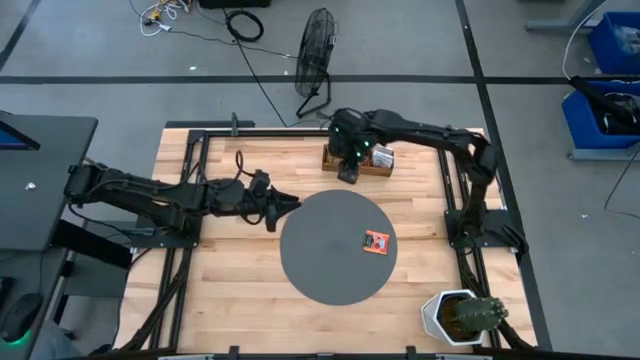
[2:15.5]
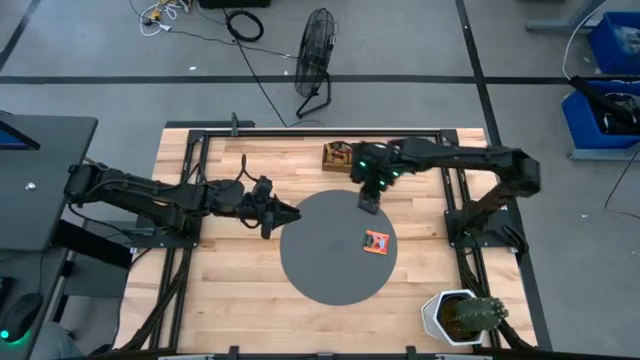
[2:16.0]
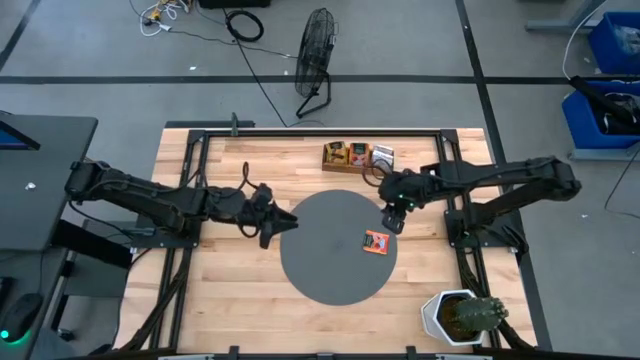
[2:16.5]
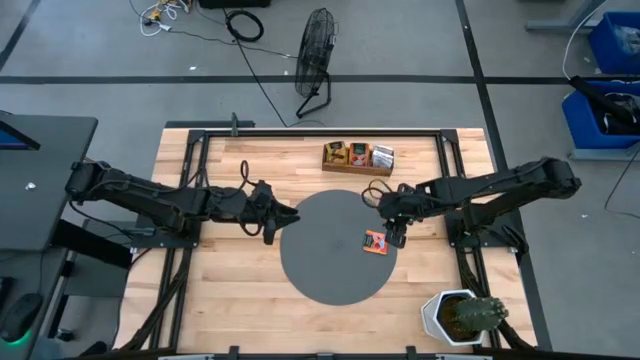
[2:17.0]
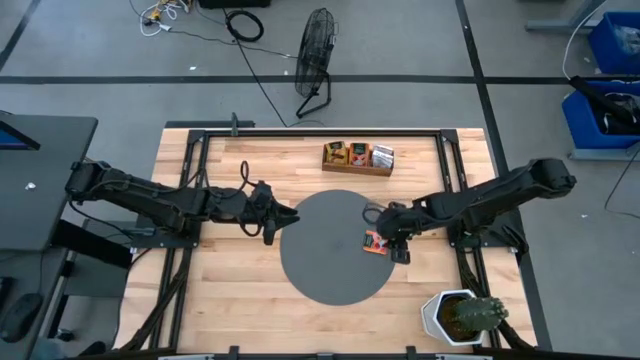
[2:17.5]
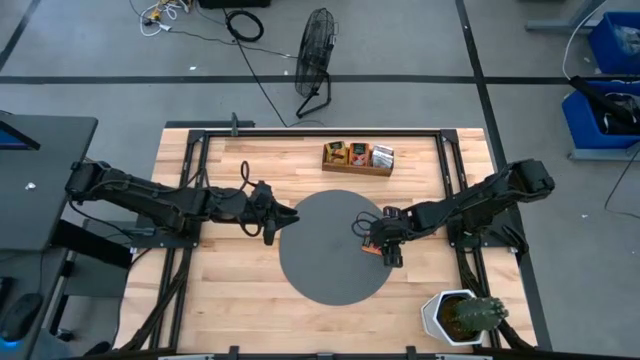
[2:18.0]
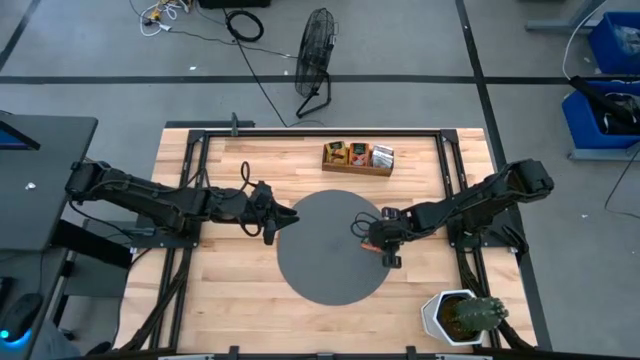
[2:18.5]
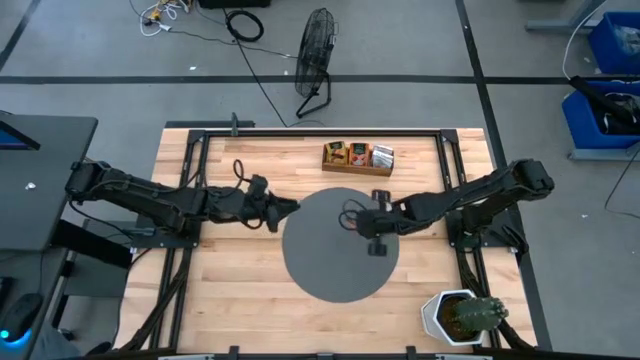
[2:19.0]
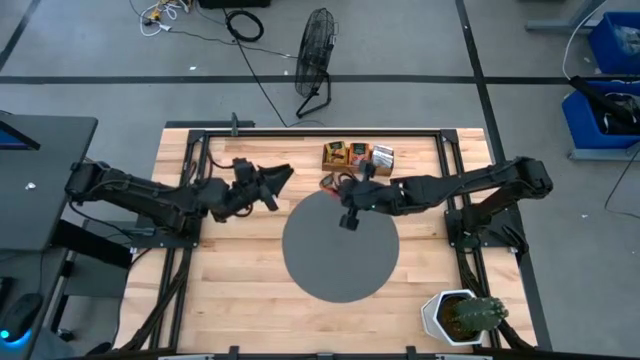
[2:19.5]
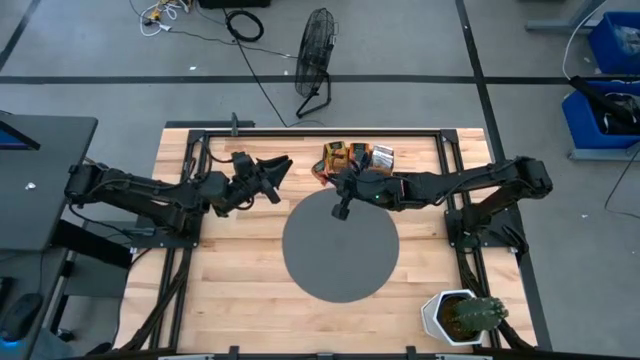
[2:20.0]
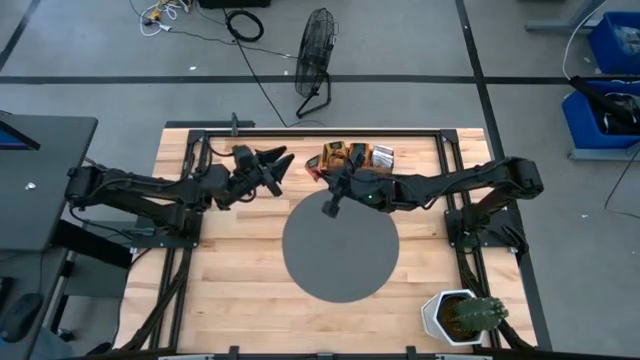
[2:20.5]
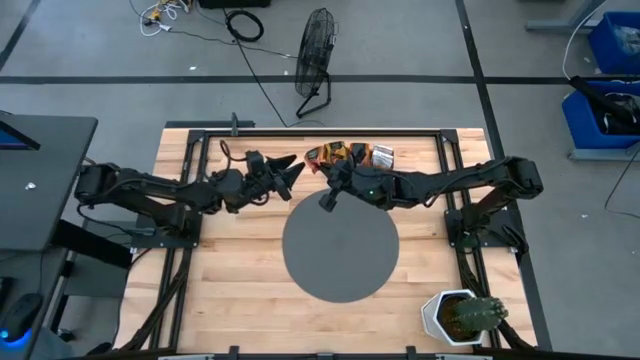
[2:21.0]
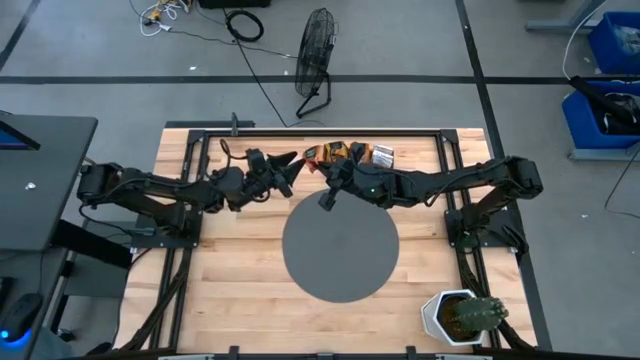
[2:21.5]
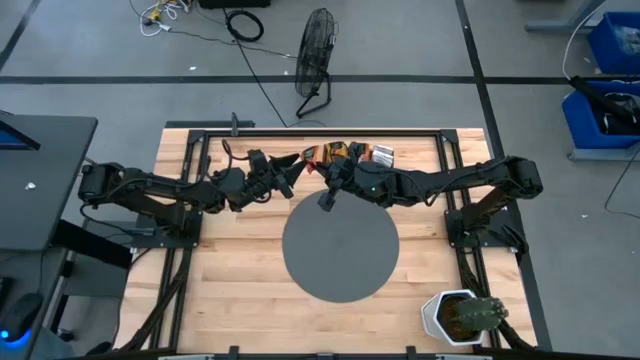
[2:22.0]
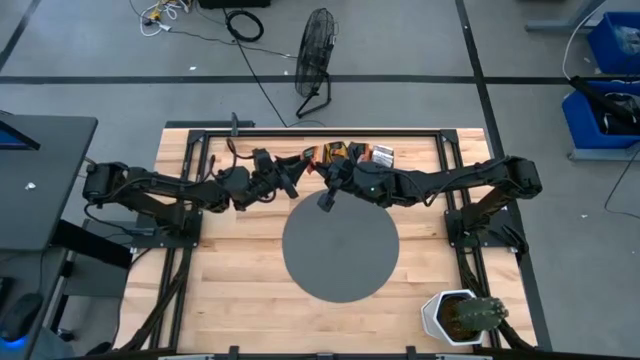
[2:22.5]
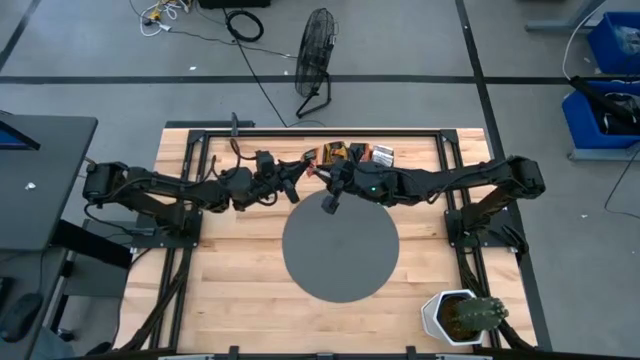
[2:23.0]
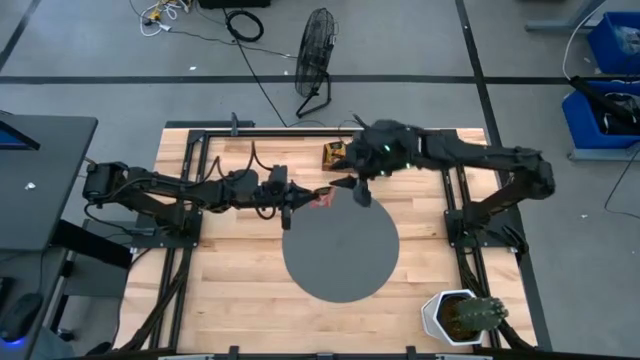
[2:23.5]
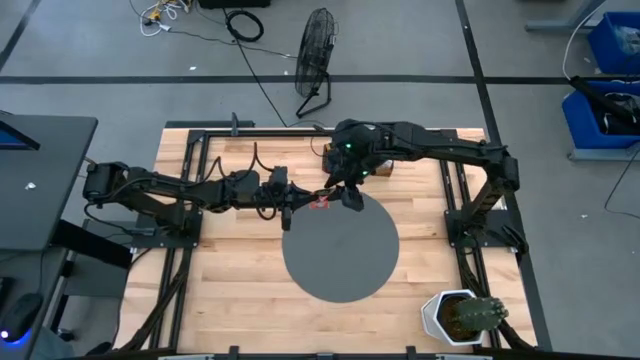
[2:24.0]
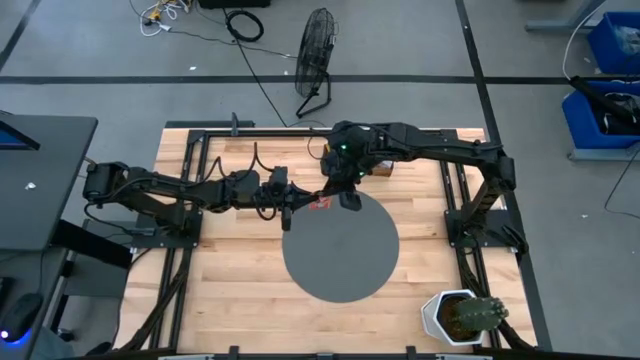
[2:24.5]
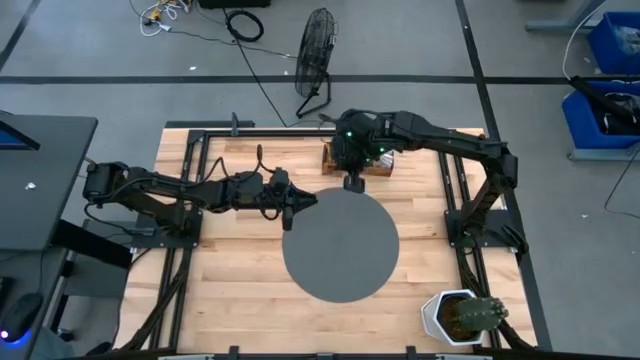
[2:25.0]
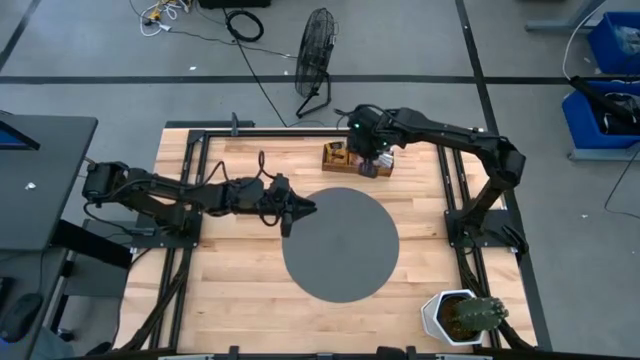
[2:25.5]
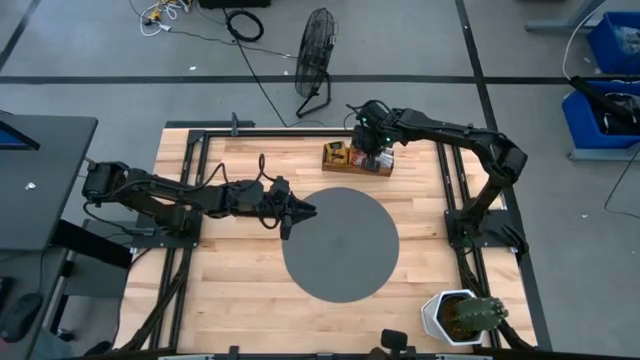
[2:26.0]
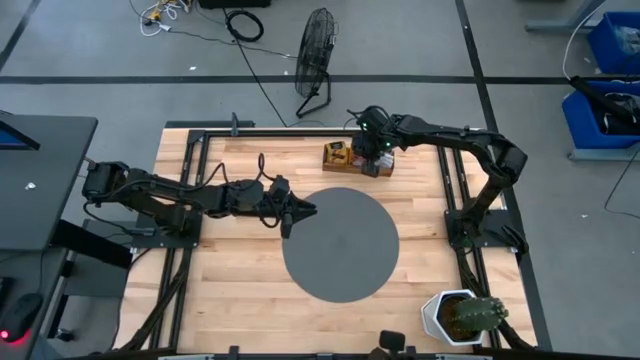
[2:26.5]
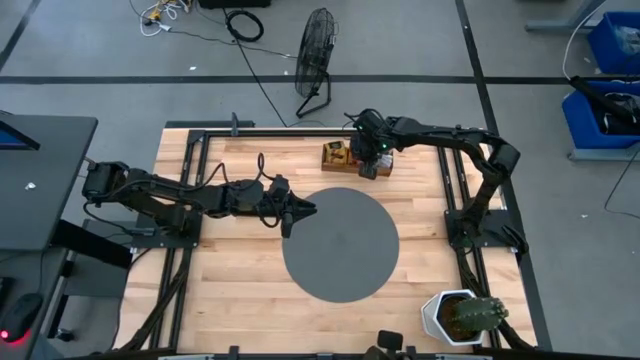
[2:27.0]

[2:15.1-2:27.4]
Task: Pick & Place Tea
Put the orange tea bag into the middle section of the wooden organizer

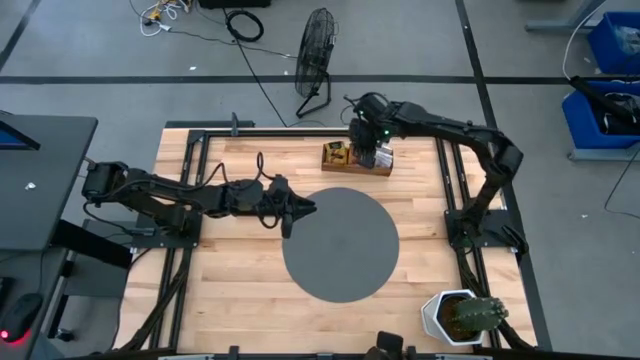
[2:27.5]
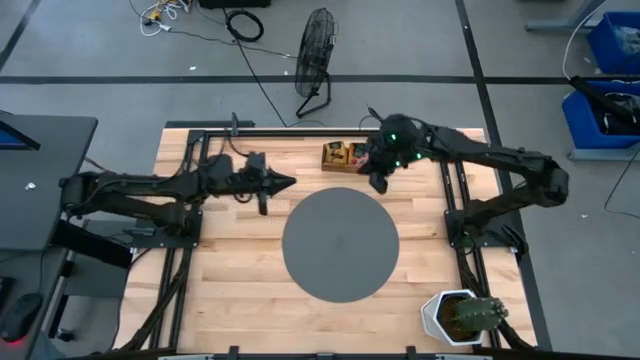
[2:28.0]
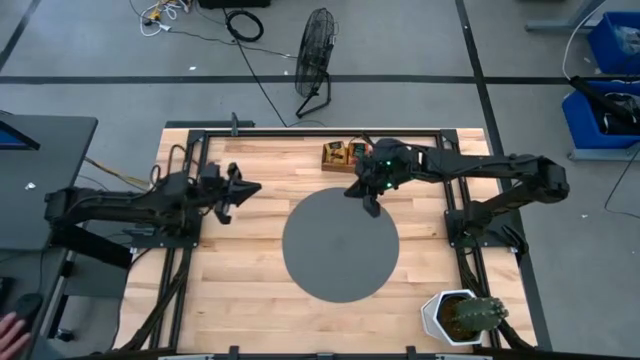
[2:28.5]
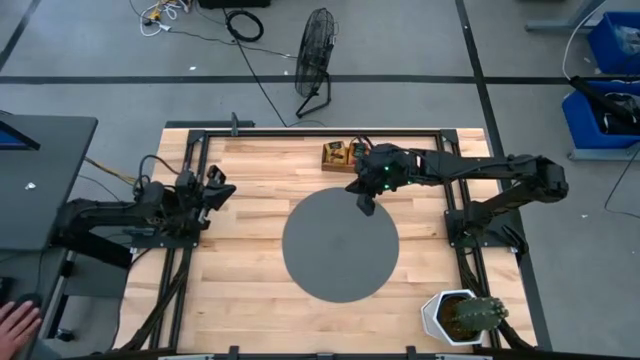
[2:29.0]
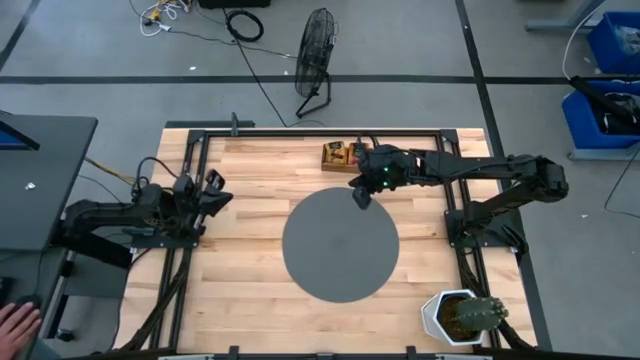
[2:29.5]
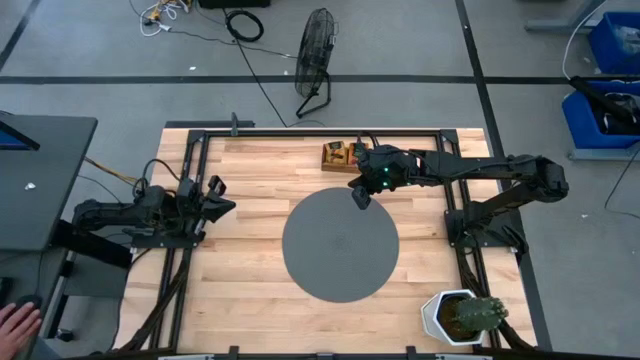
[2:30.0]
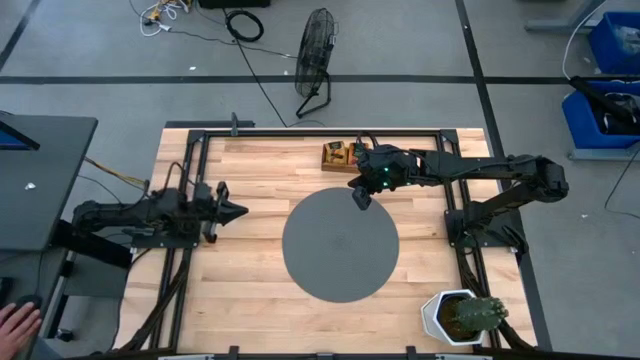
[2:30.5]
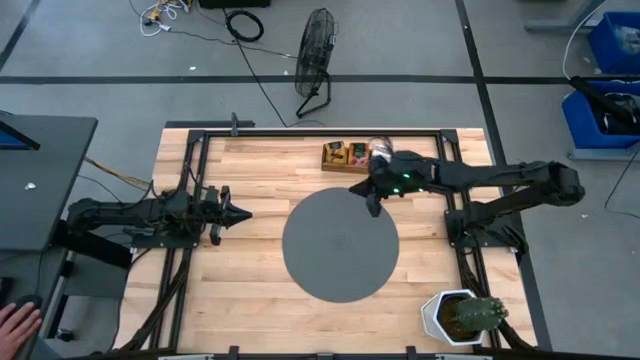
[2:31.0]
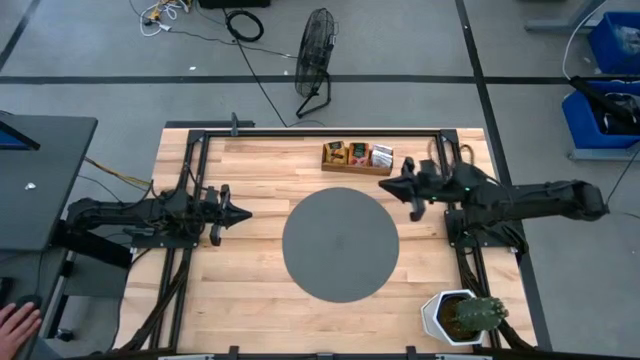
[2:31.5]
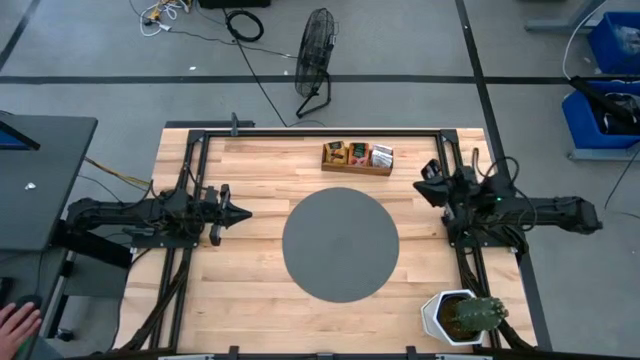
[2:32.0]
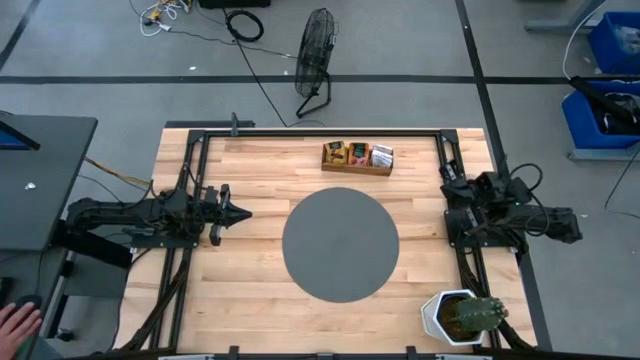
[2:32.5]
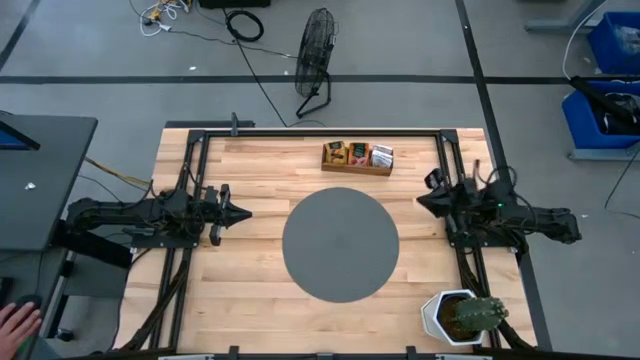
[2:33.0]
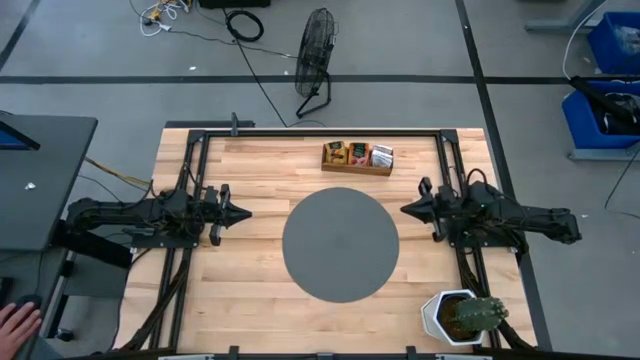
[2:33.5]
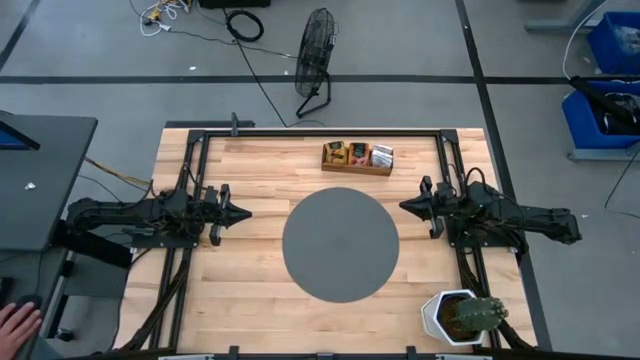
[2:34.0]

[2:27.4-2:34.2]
Return to Home Position
